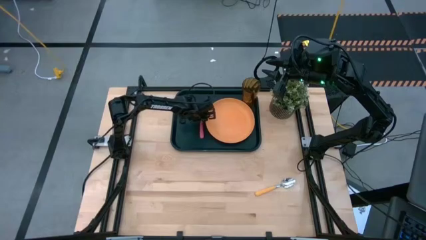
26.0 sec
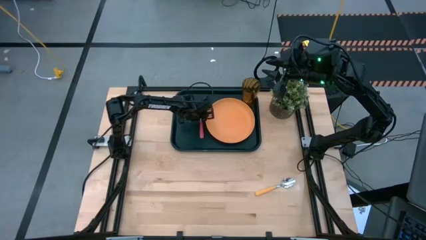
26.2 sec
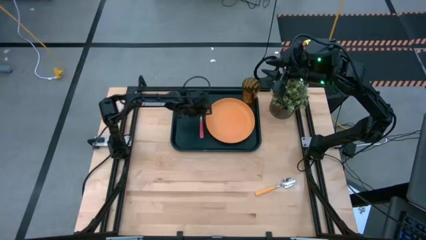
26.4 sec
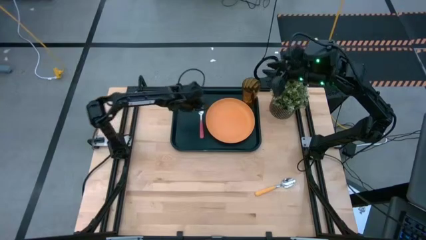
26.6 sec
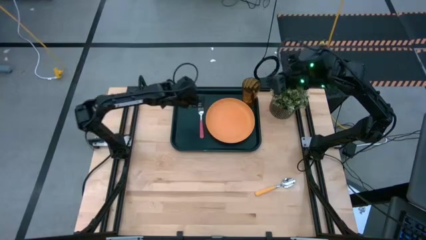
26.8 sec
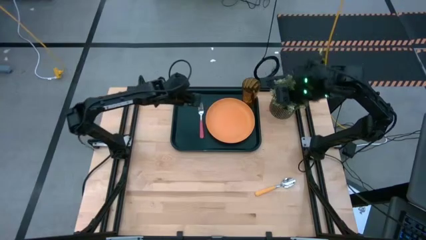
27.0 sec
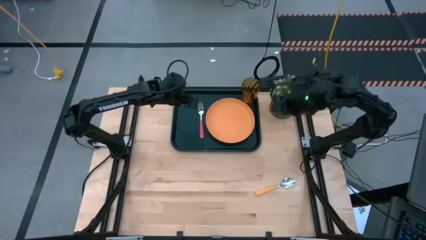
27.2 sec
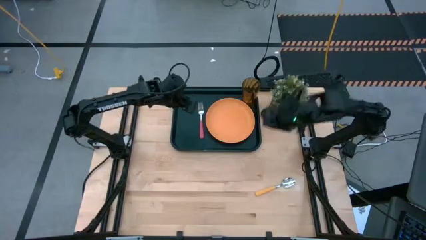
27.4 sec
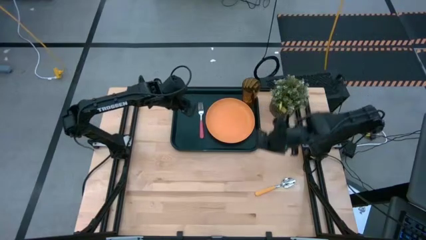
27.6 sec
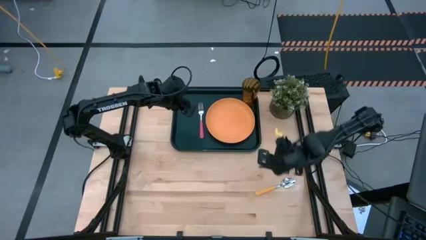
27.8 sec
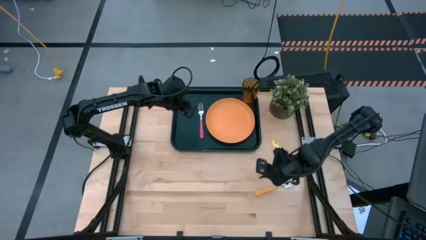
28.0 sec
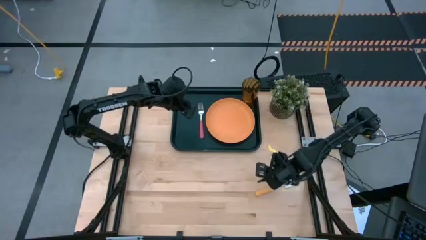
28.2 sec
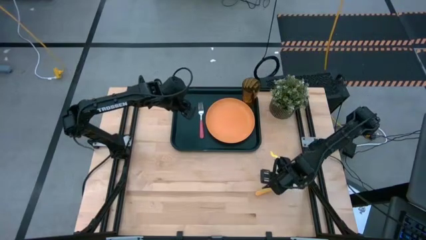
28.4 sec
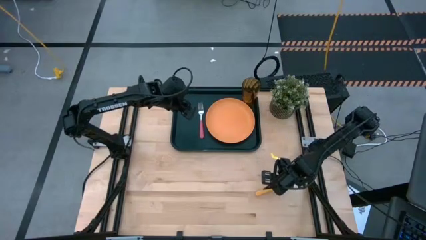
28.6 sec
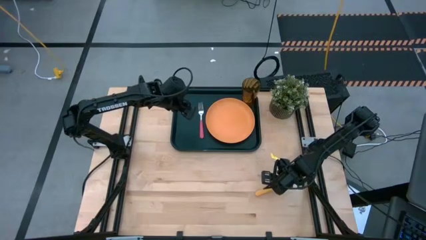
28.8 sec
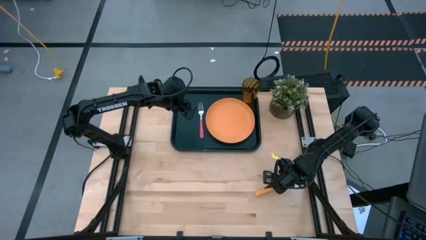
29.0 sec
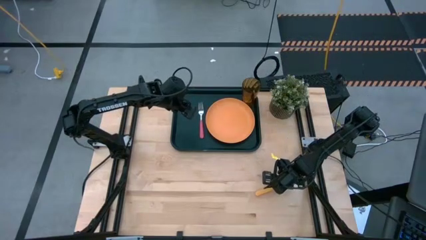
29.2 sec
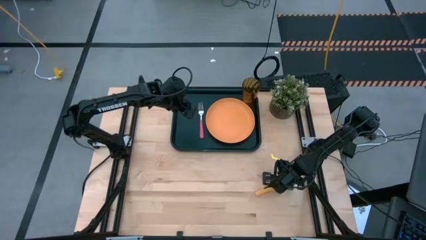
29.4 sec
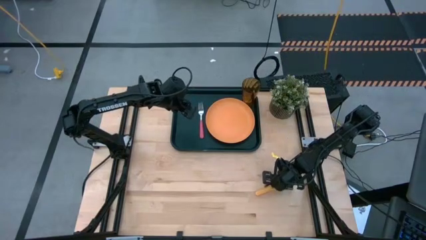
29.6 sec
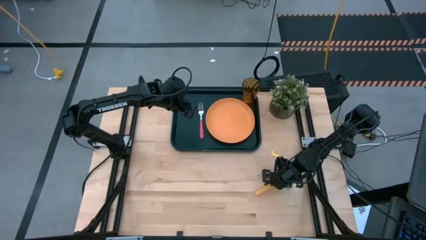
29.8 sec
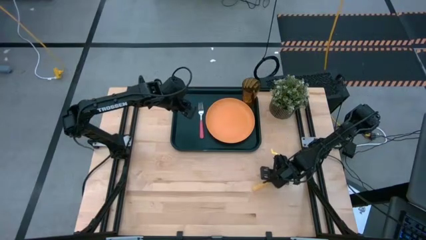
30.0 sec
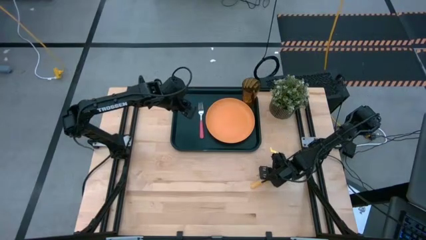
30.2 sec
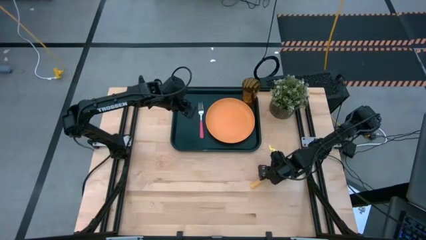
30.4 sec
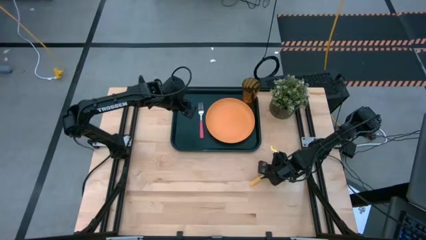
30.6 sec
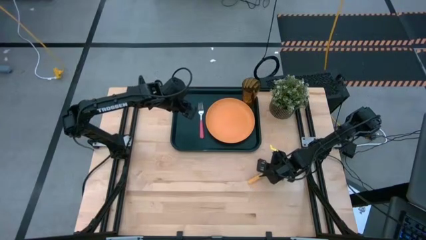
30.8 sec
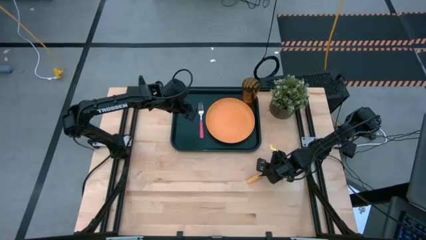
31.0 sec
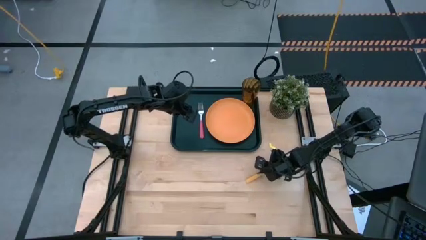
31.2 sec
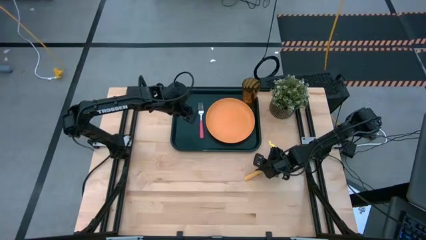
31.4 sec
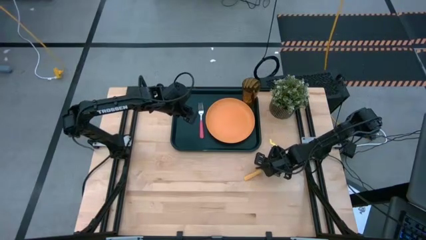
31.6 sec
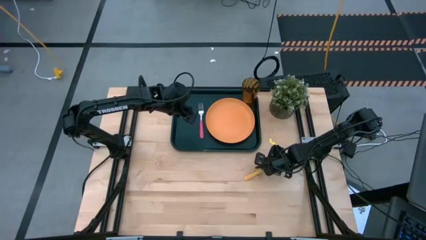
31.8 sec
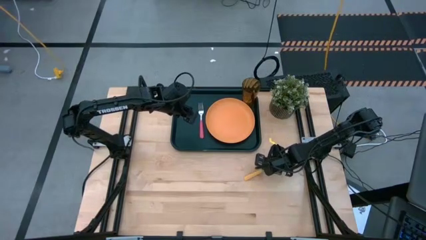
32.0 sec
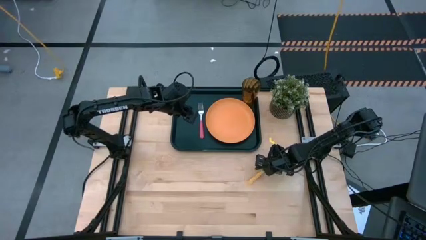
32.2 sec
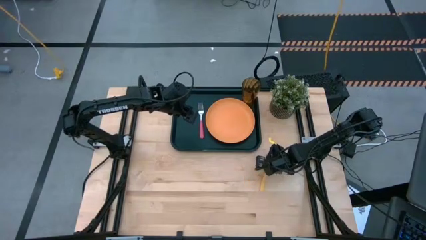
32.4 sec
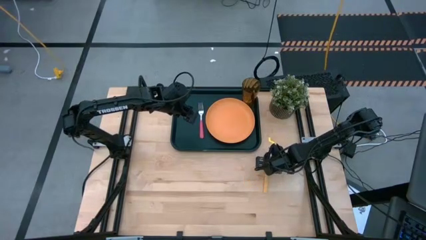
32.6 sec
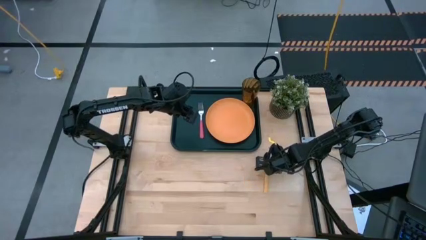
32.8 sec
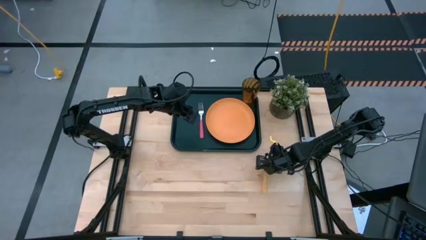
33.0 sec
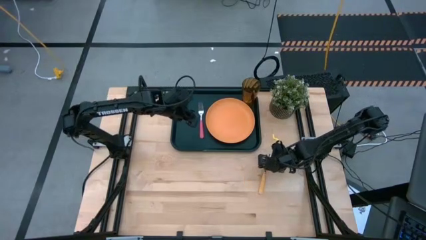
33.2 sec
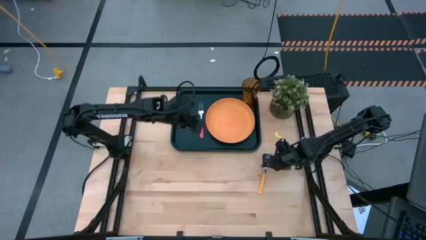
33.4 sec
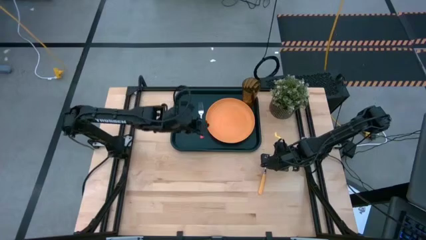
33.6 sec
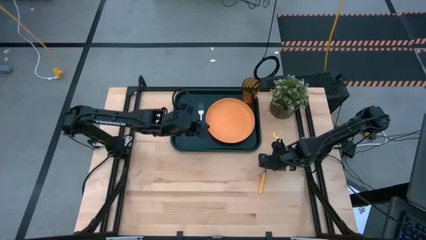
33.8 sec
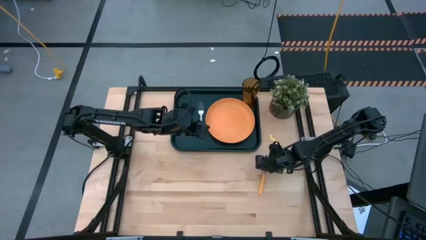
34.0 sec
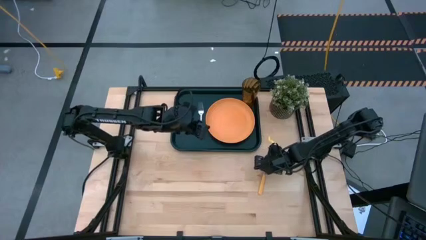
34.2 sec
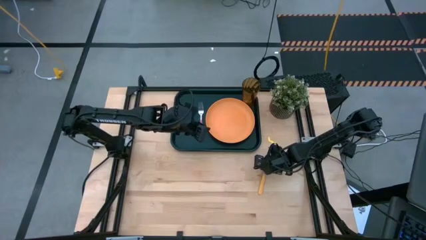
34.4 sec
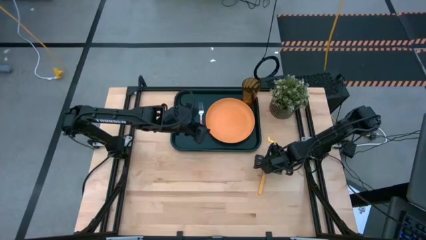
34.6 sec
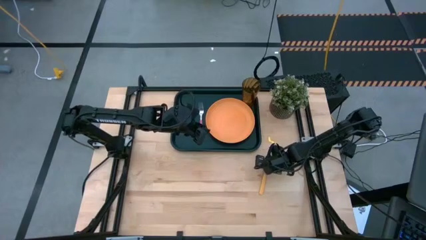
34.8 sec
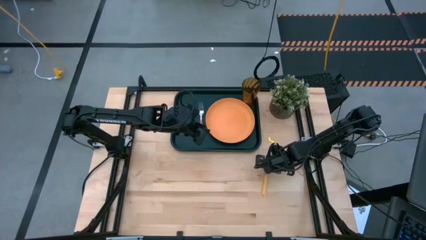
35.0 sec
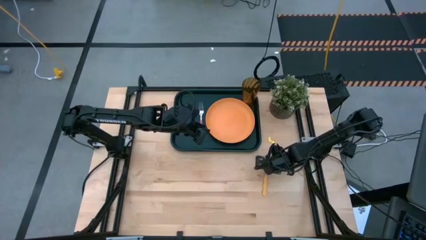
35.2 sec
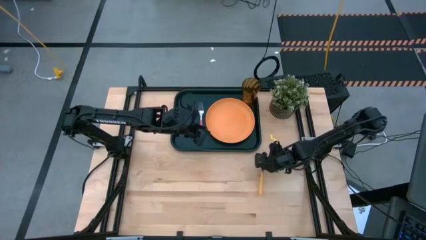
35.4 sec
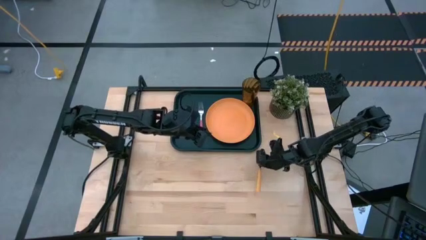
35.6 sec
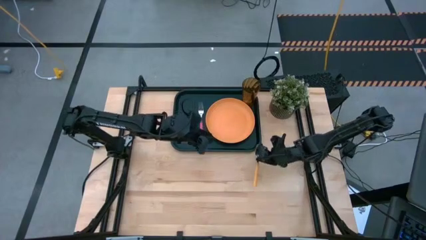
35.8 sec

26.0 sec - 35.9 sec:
Task: Pick and place plate/cup/fork/spoon on tray
Put the orange spoon to the left of the pink fork on the black tray

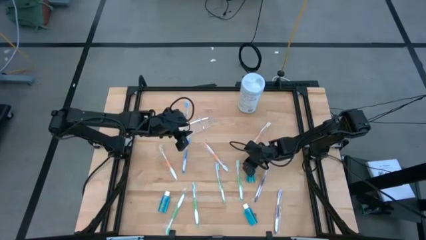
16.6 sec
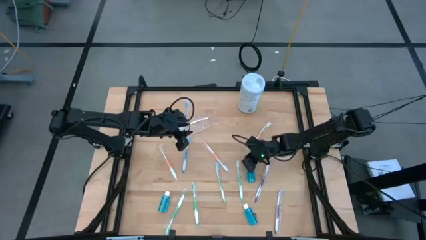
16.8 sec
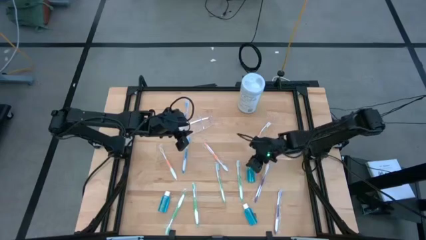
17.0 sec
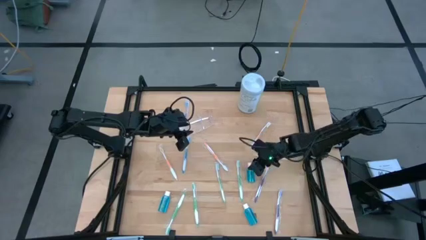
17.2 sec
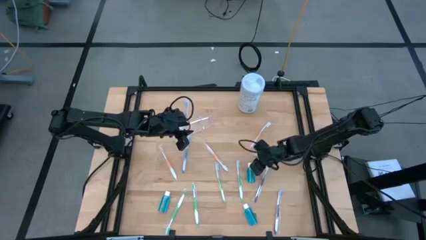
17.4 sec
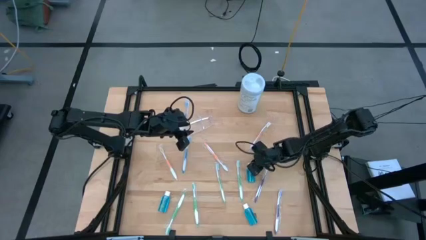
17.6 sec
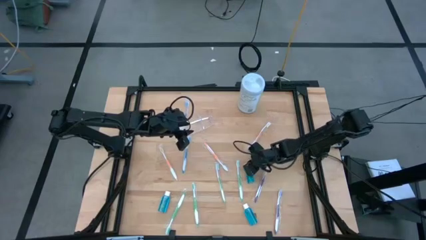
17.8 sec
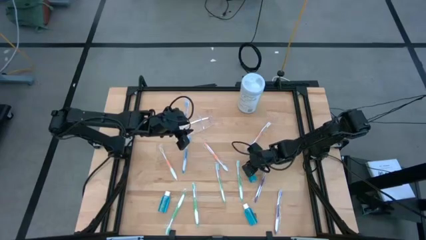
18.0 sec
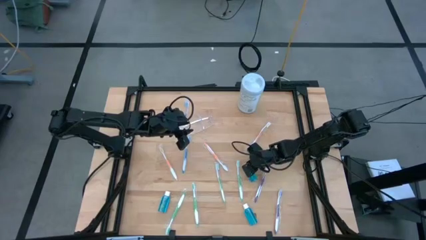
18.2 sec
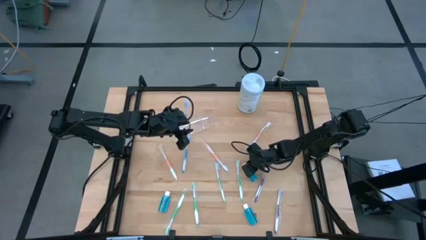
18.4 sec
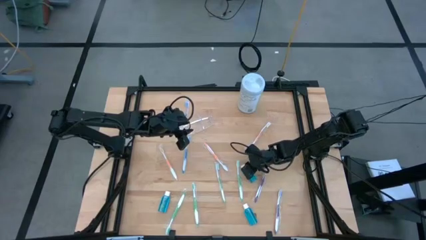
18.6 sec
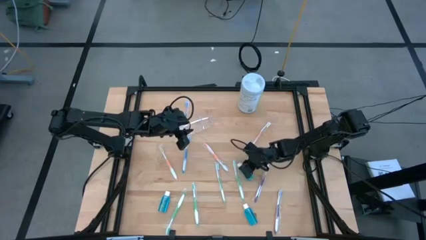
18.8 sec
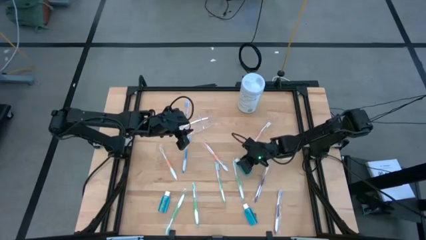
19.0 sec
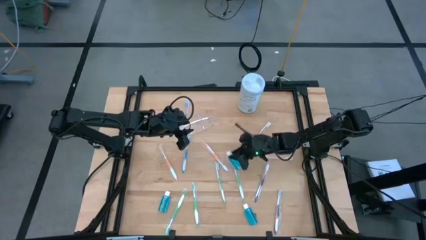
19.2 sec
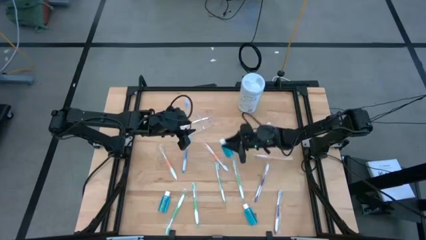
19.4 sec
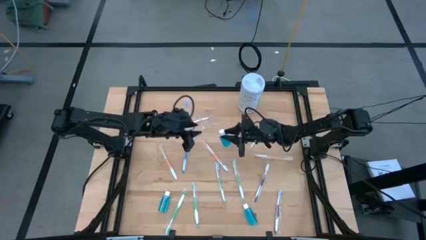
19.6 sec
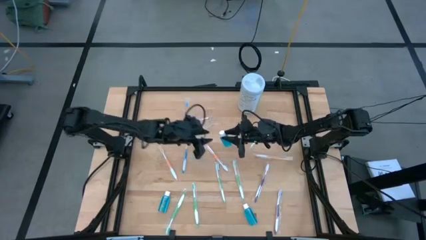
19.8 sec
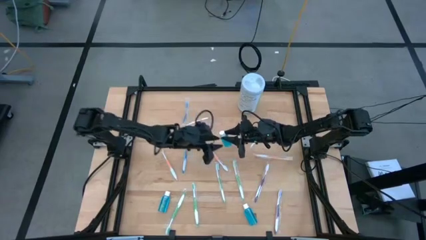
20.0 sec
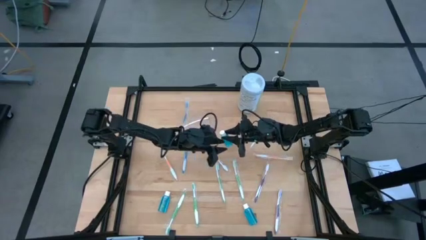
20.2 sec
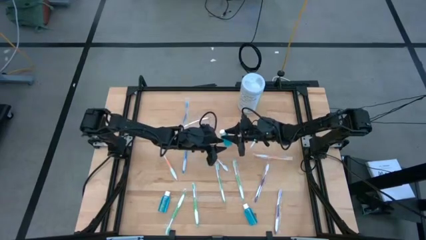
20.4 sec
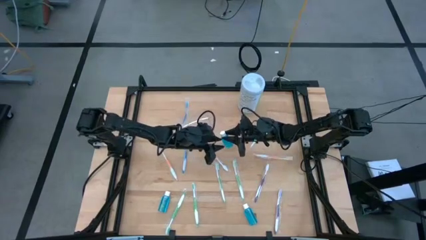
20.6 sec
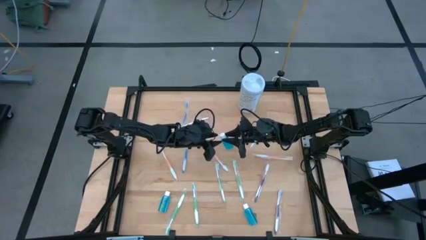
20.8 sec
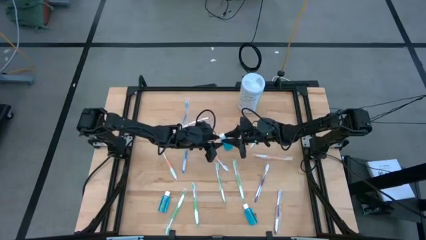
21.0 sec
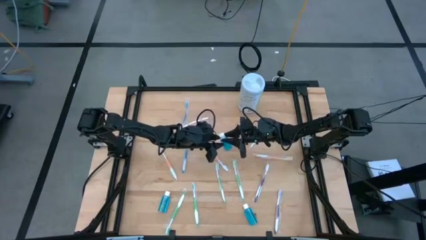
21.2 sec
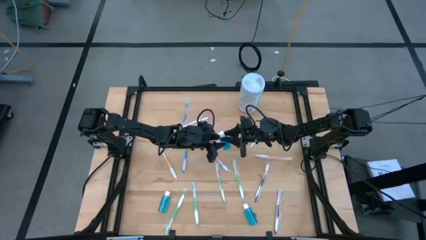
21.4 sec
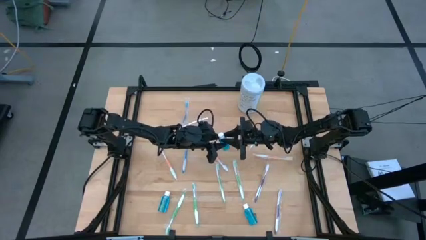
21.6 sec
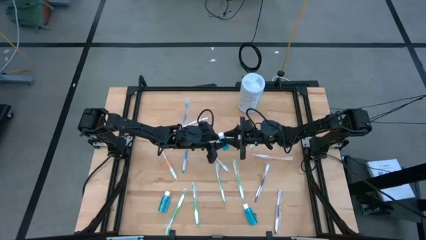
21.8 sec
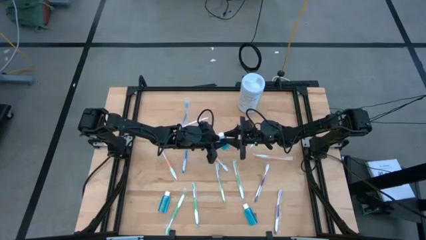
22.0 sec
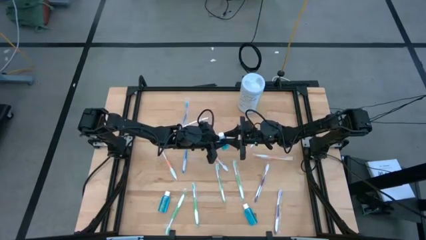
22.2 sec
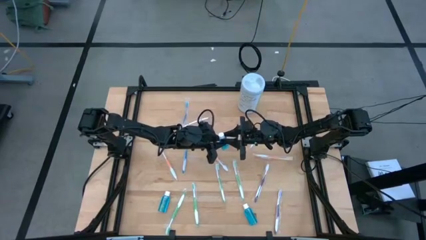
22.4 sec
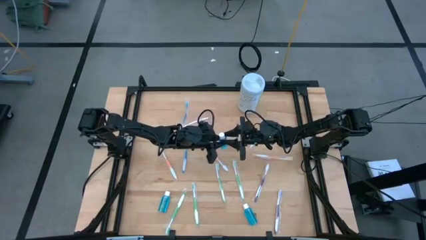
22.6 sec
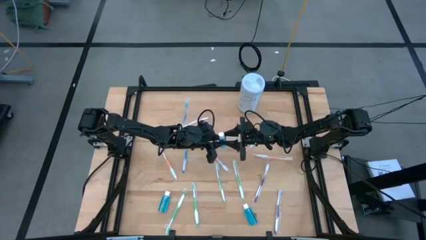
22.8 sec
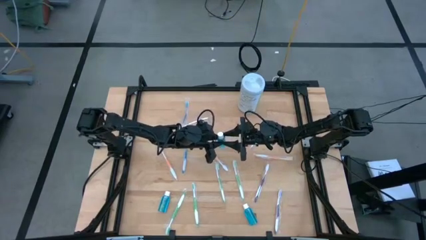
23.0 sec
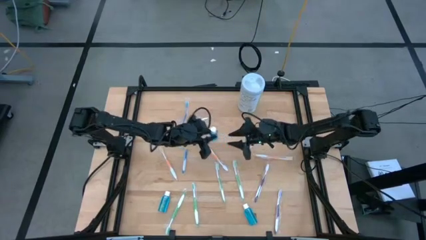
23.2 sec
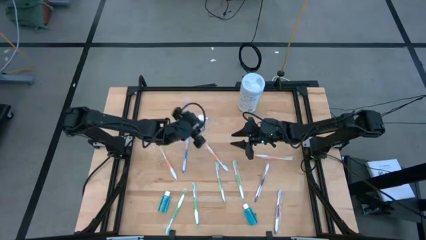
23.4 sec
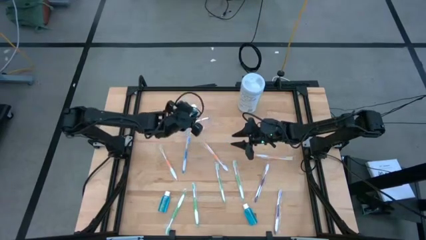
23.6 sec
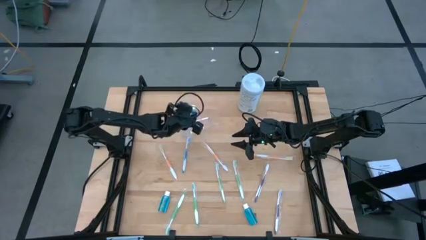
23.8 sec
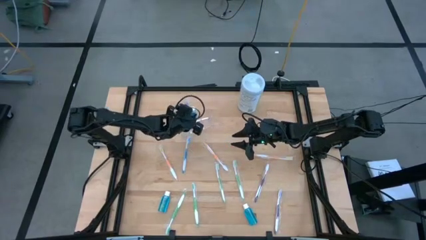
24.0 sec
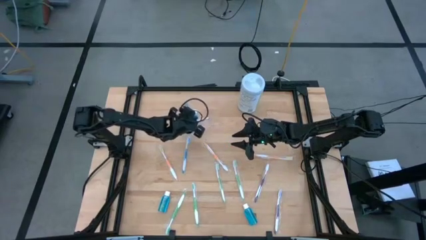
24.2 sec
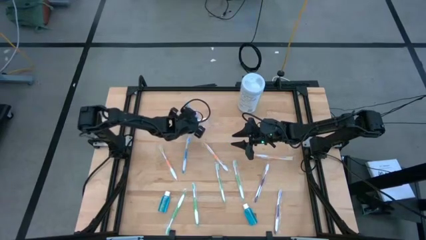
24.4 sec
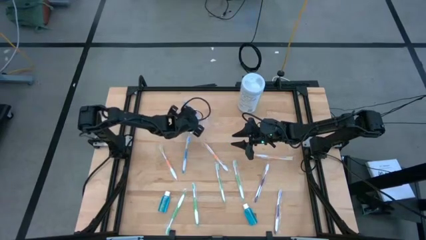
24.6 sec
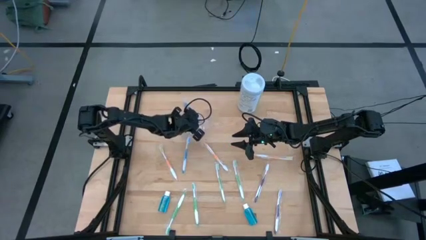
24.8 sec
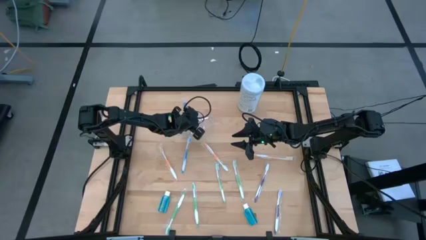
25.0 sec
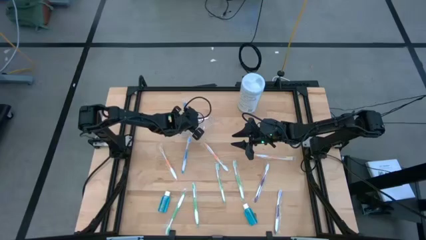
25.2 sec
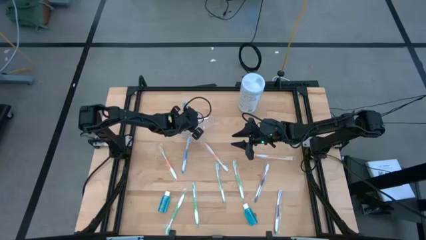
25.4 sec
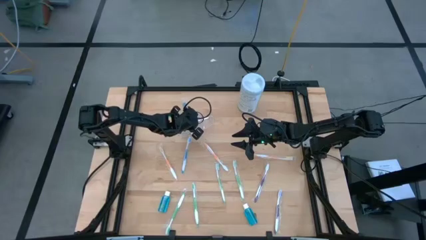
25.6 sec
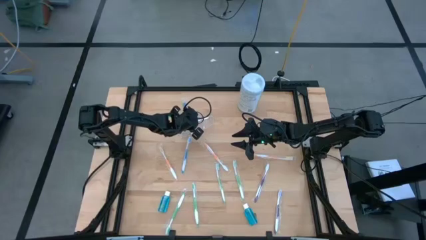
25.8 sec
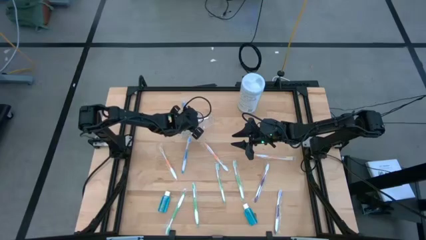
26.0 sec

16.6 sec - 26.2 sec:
Task: Pick & Place toothbrushing station
Put the blue mouthwash into the transparent organizer
